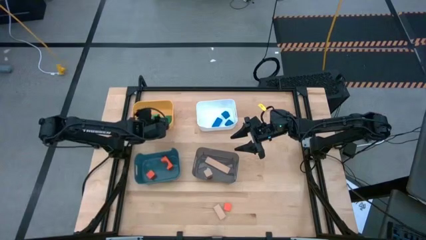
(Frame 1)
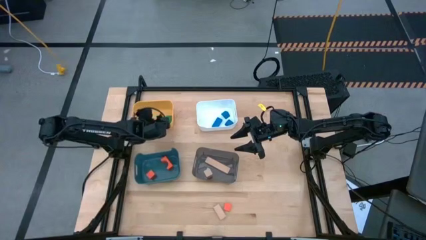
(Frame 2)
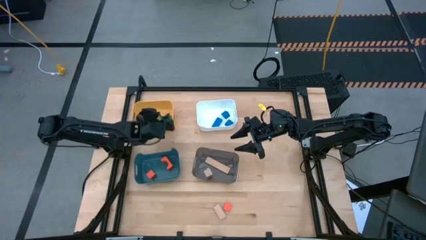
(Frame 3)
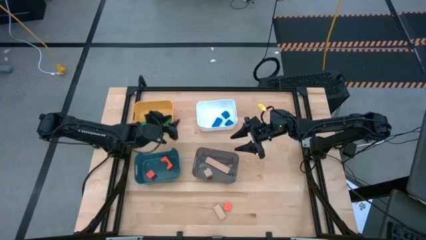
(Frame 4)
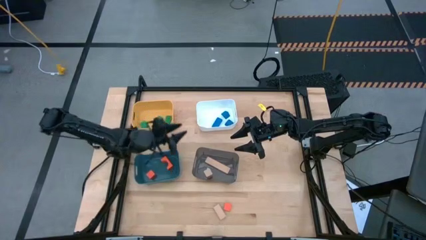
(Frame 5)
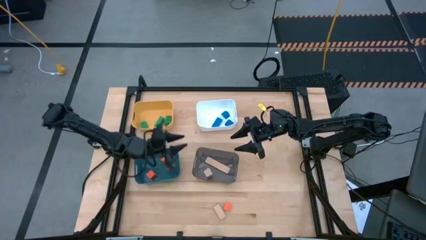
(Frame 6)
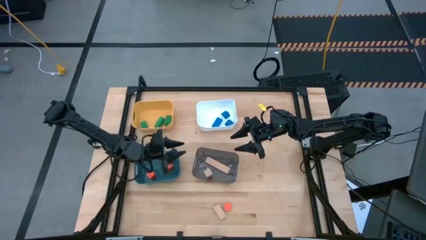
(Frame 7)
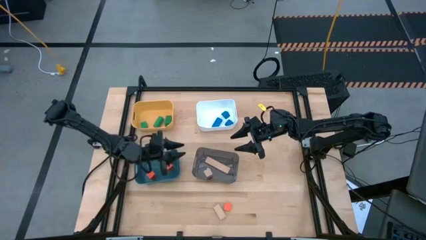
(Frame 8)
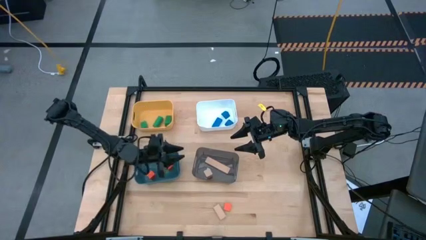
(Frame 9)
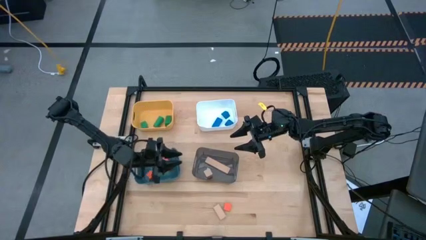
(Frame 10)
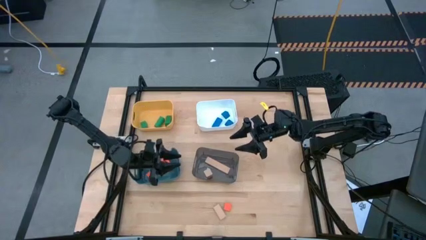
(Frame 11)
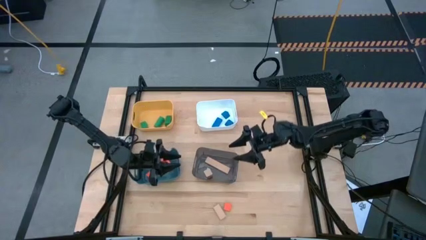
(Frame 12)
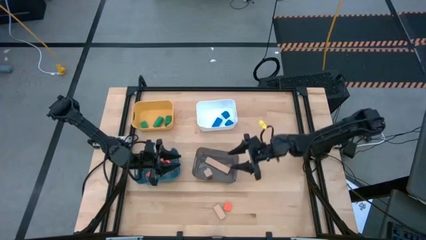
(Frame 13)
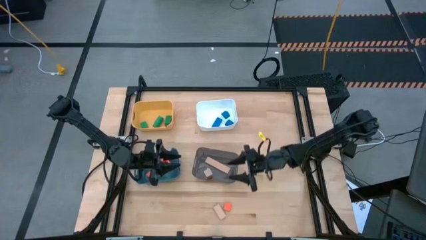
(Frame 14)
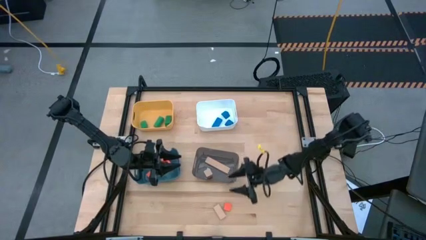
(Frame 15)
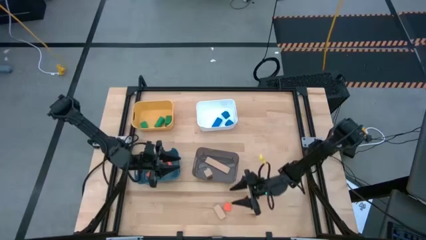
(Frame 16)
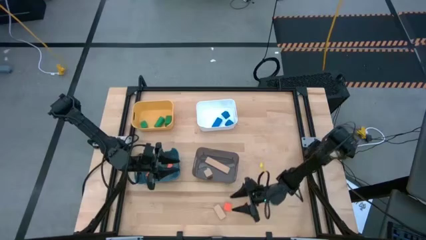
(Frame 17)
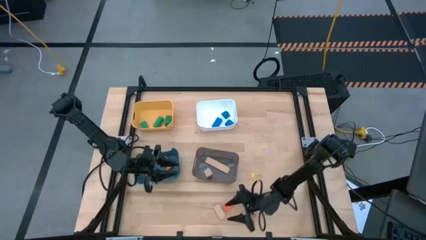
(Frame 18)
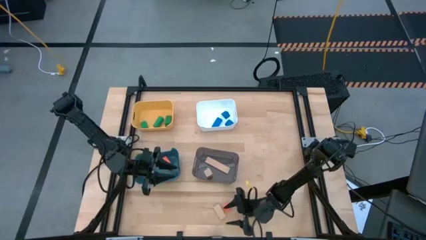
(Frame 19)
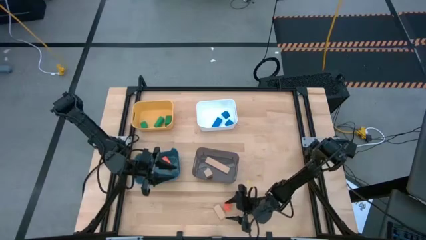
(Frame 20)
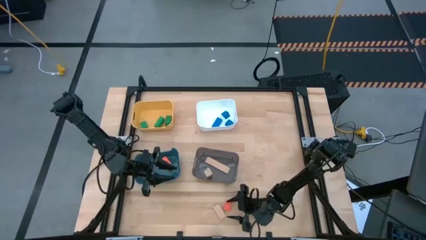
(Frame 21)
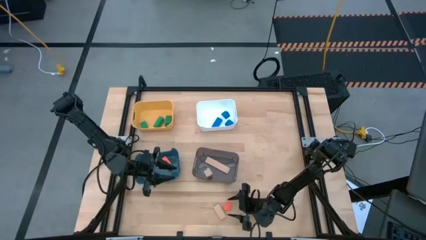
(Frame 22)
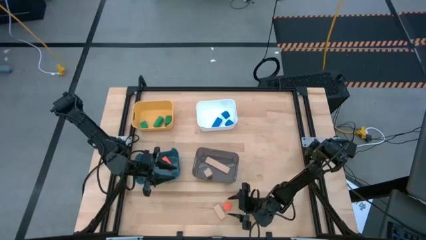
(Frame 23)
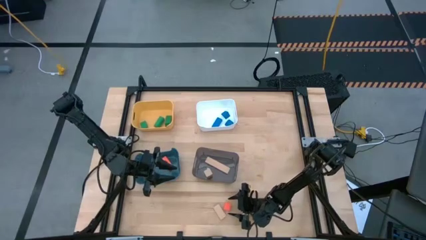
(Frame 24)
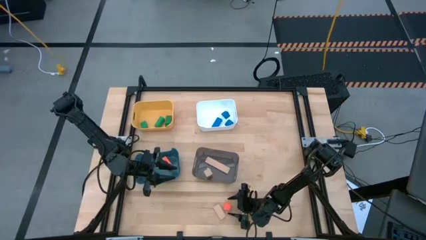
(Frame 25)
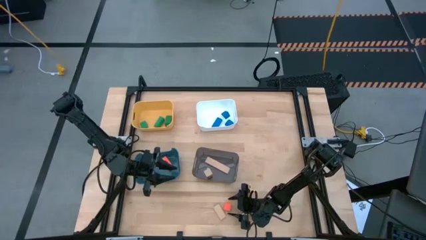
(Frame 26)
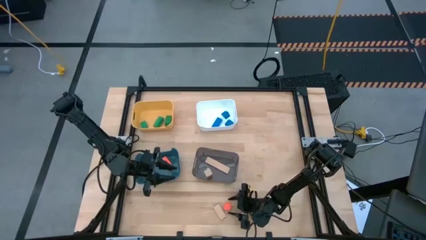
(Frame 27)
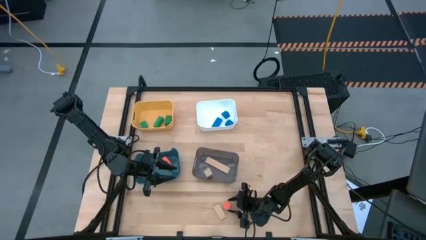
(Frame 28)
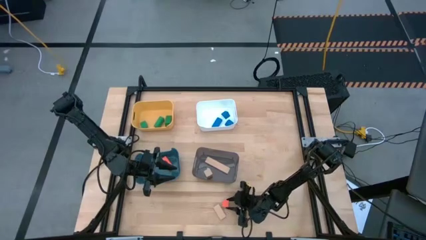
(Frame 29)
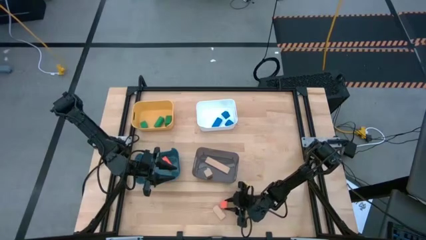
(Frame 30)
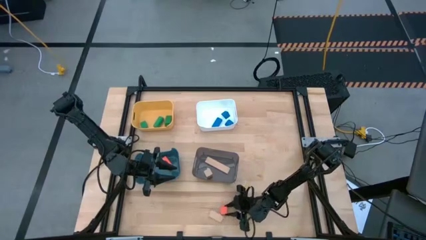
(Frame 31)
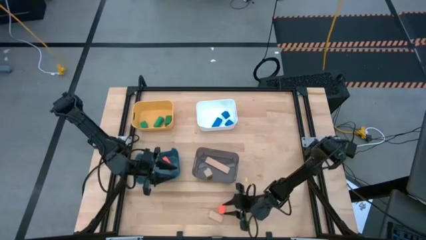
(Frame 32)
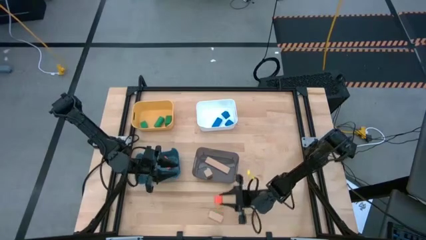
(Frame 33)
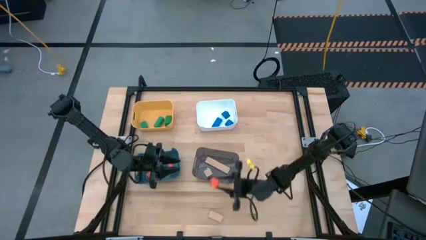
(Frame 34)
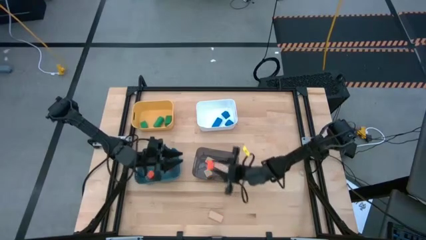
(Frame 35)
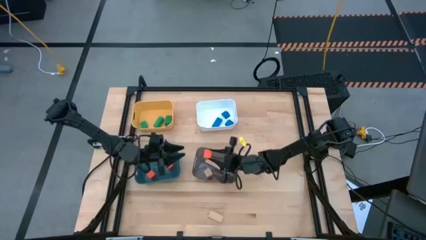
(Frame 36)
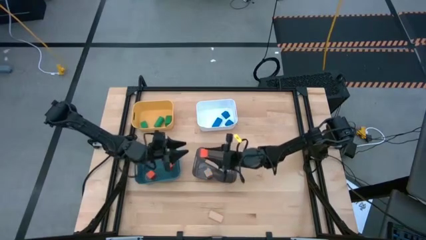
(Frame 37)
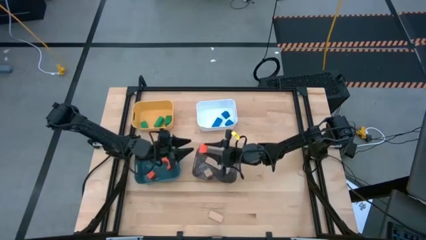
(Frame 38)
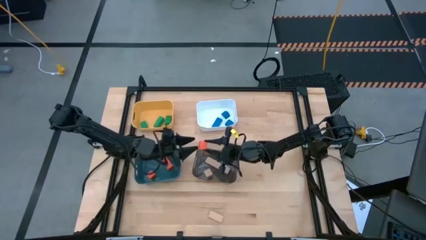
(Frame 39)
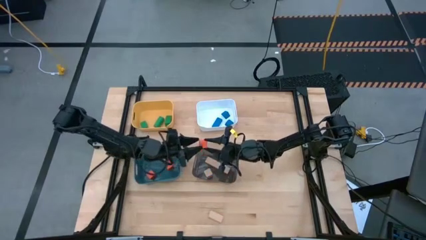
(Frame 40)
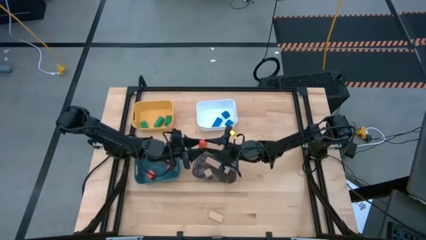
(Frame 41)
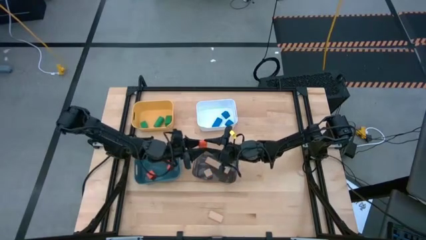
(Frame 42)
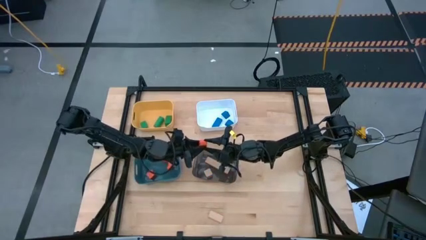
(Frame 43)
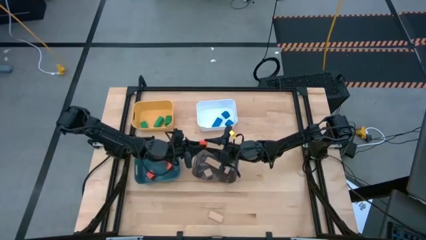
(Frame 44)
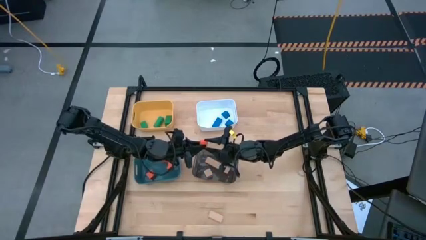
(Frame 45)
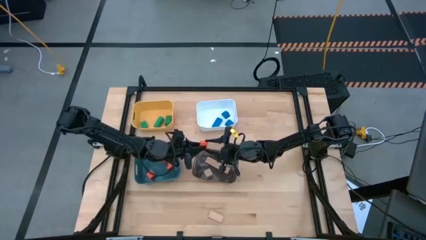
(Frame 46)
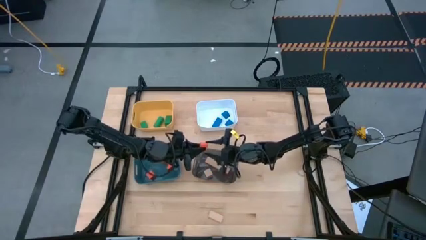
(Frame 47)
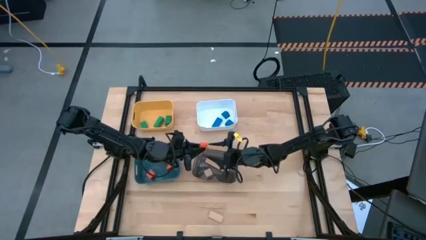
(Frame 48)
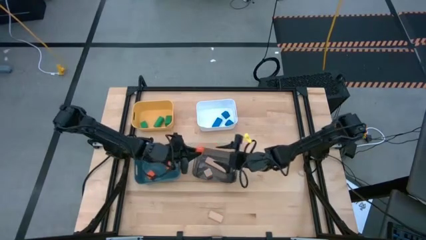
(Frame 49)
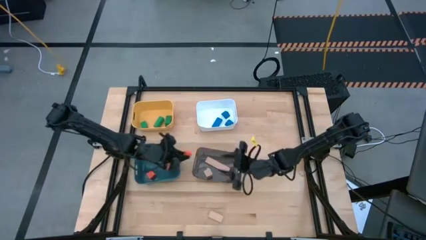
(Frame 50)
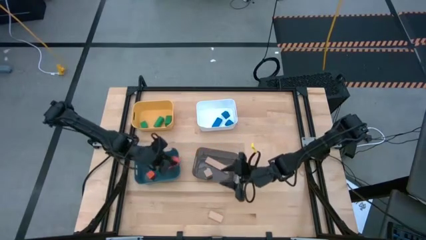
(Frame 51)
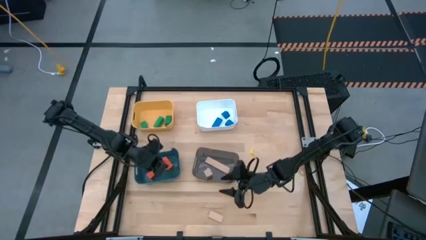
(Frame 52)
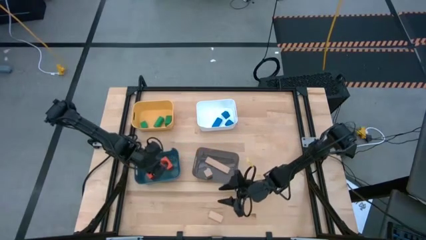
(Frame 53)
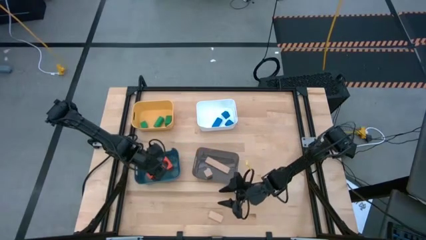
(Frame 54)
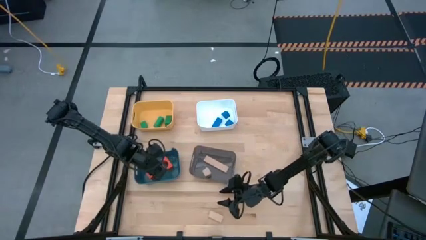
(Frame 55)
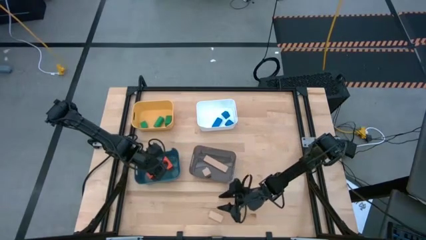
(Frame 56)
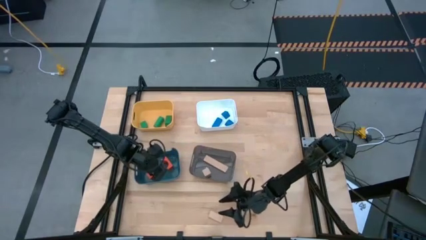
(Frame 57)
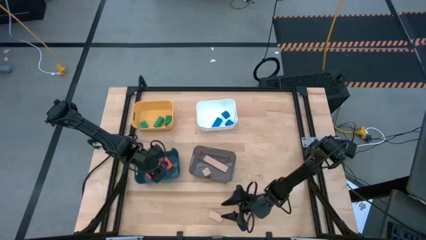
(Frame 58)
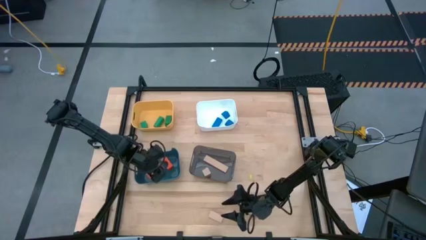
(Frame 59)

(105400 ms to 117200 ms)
Task: Sort & place blocks by color
Put the orange block into the blue bin

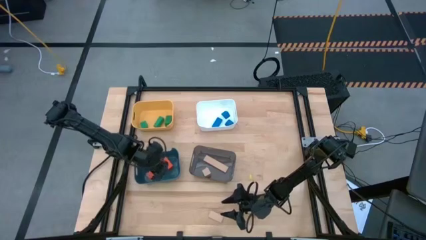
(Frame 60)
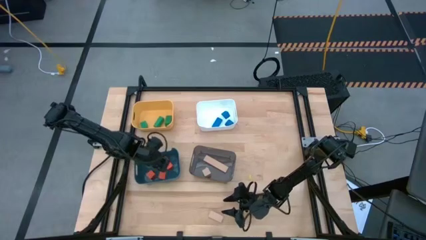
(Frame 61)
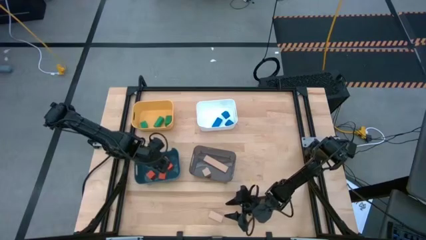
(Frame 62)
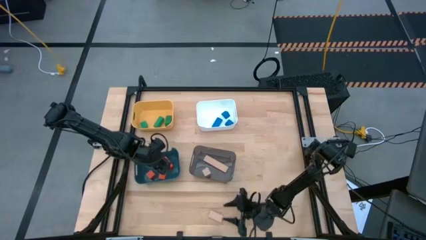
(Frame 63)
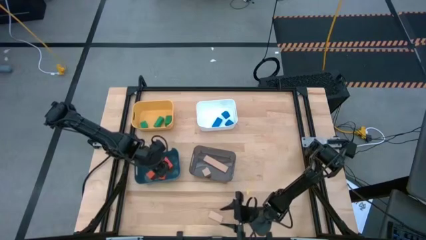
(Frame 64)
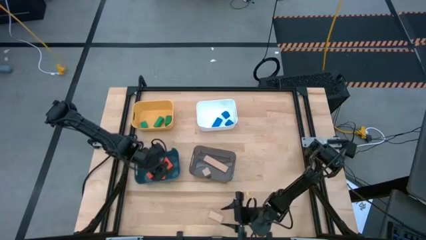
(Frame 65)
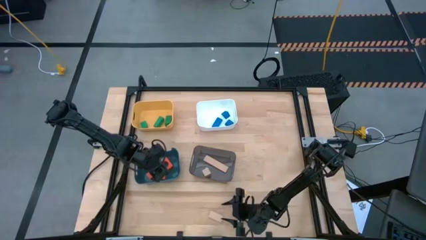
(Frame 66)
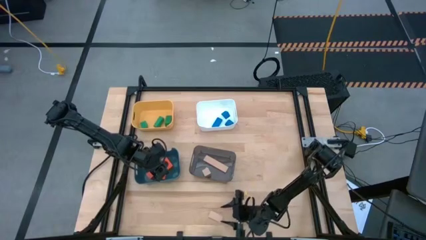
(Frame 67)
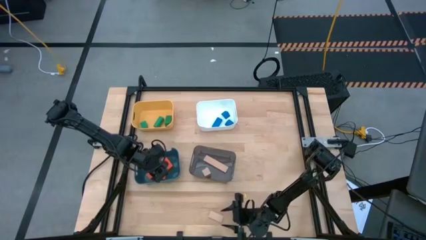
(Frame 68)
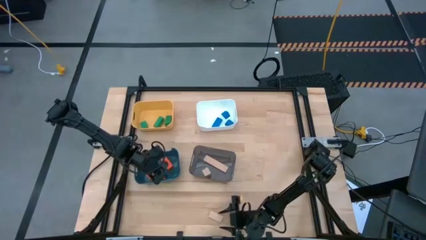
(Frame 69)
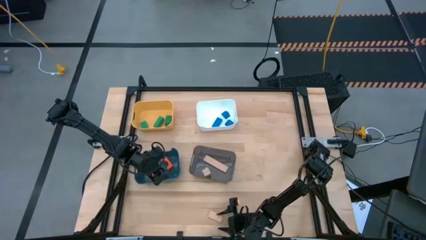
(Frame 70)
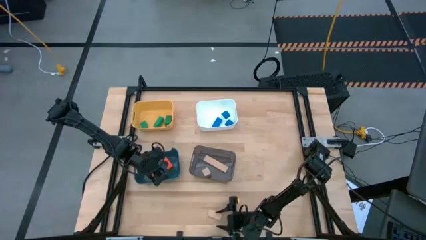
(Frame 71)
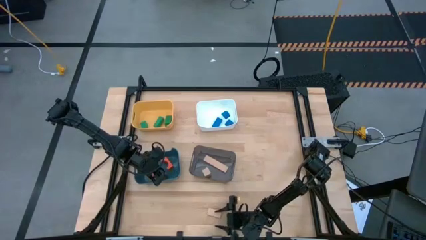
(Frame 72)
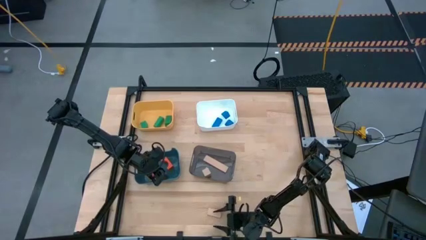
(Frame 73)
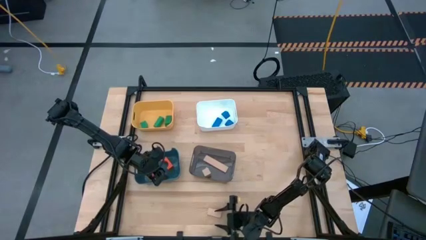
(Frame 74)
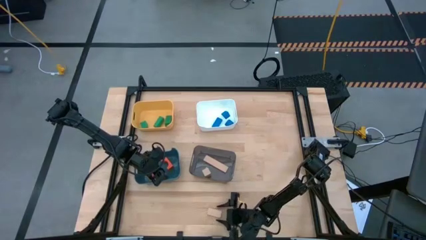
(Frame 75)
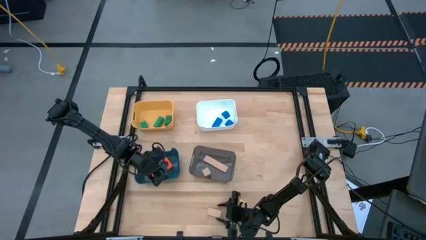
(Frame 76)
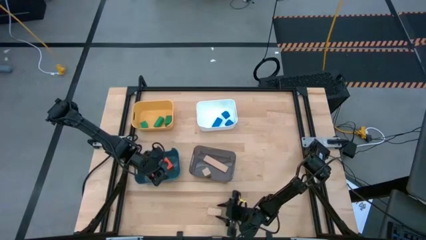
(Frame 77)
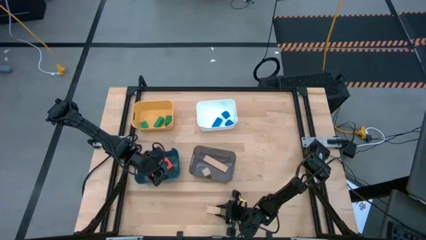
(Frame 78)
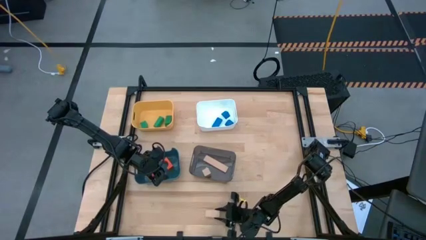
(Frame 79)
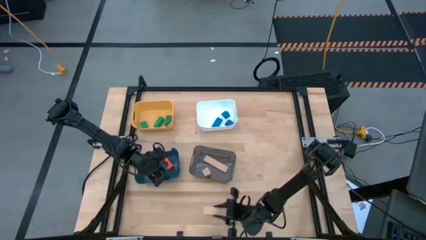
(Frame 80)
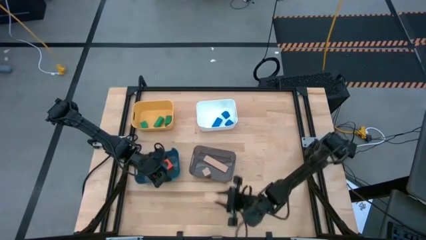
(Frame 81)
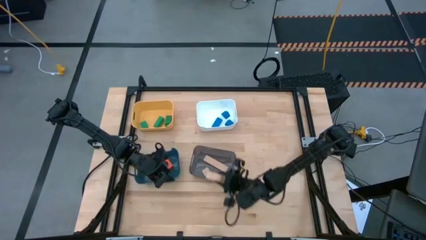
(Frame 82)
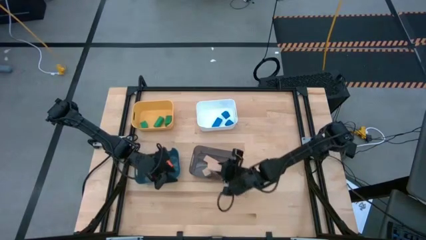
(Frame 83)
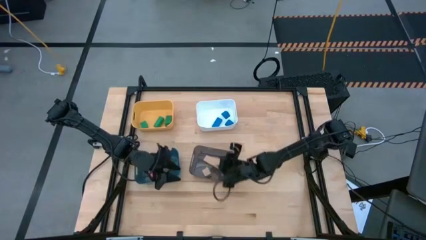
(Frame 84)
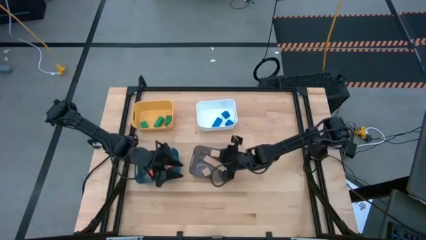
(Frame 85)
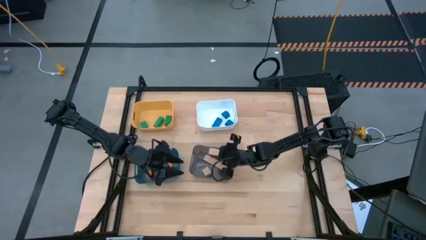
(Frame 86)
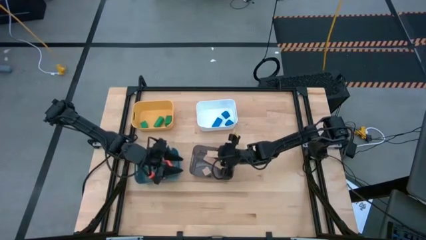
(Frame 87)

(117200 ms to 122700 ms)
Put the brown block into the black bin
